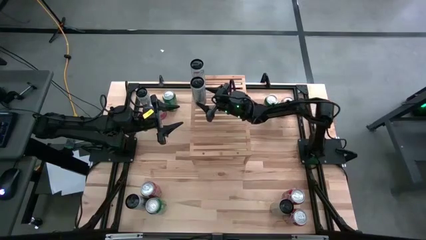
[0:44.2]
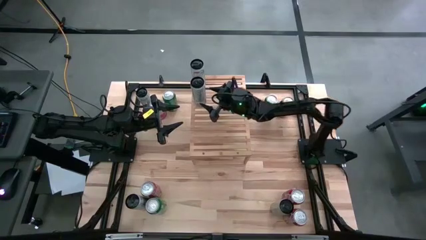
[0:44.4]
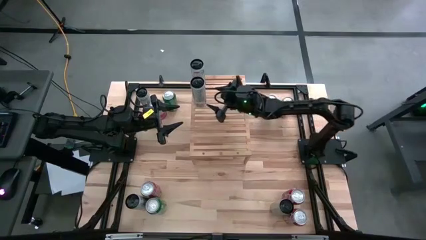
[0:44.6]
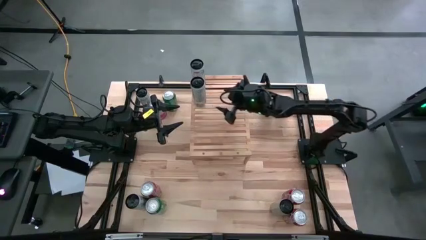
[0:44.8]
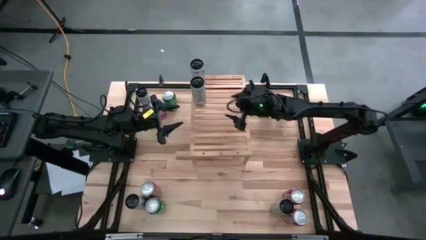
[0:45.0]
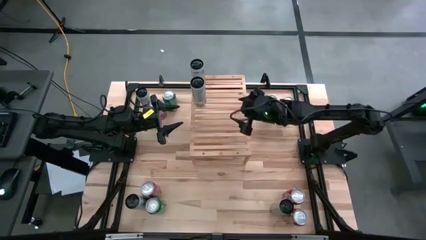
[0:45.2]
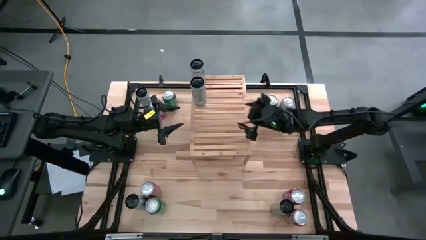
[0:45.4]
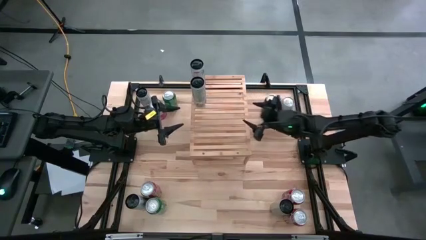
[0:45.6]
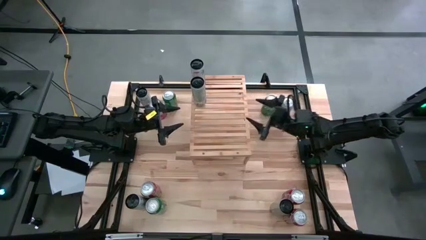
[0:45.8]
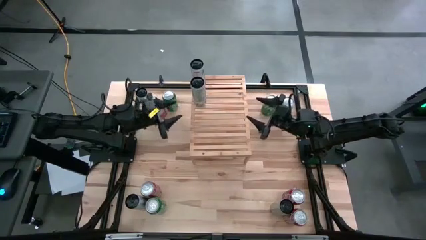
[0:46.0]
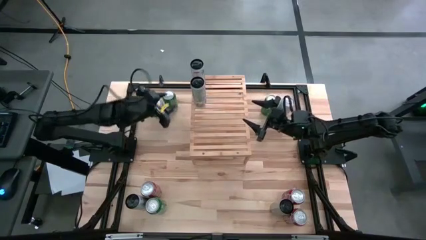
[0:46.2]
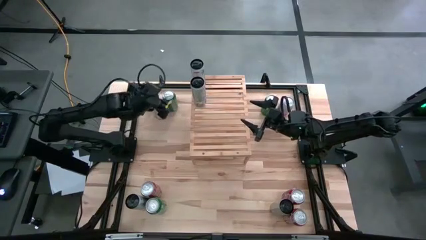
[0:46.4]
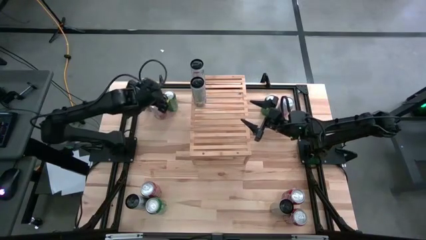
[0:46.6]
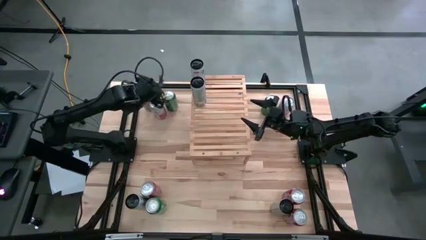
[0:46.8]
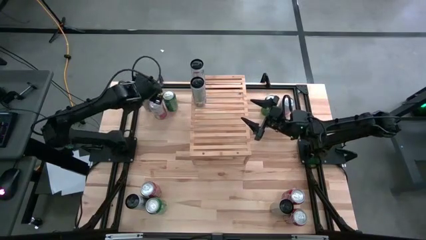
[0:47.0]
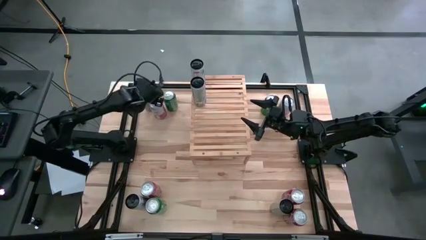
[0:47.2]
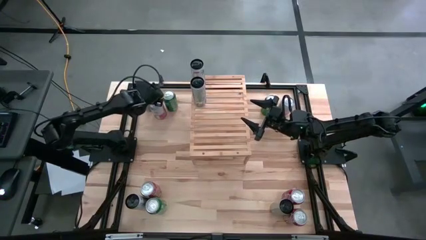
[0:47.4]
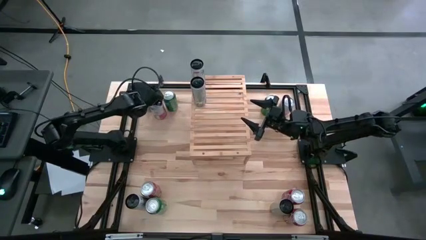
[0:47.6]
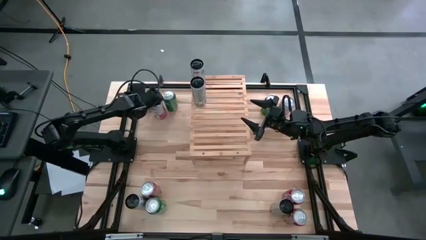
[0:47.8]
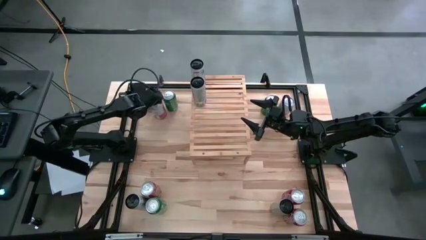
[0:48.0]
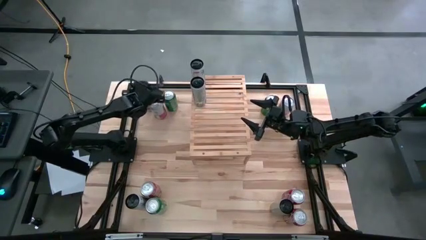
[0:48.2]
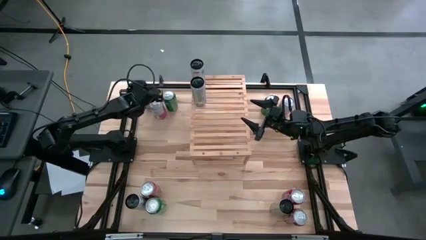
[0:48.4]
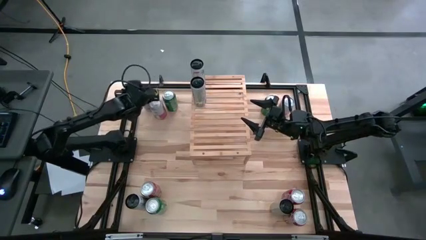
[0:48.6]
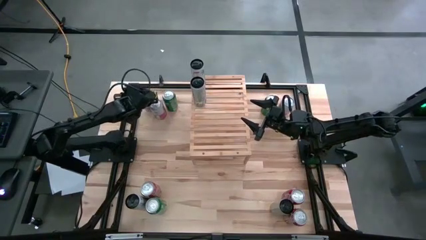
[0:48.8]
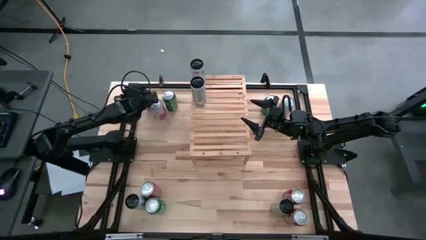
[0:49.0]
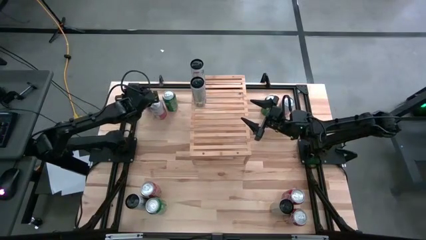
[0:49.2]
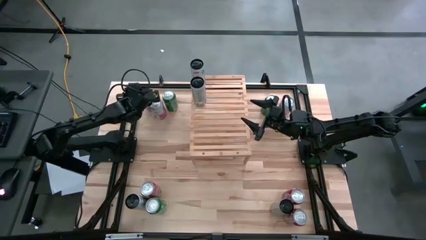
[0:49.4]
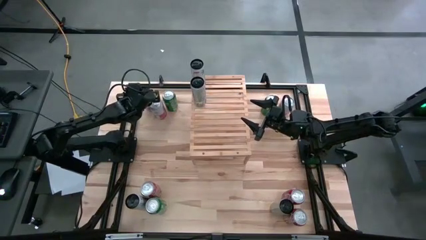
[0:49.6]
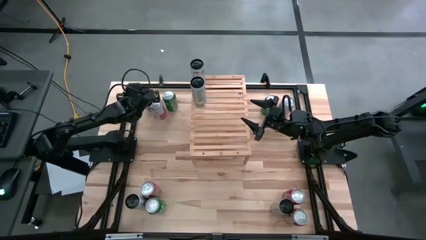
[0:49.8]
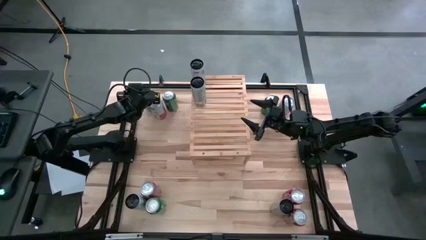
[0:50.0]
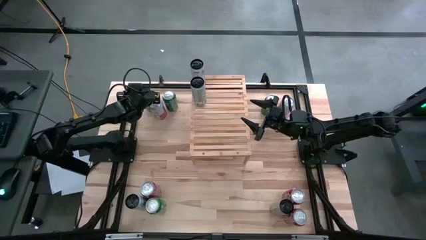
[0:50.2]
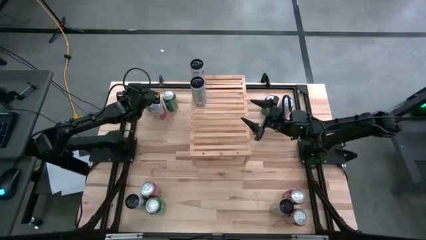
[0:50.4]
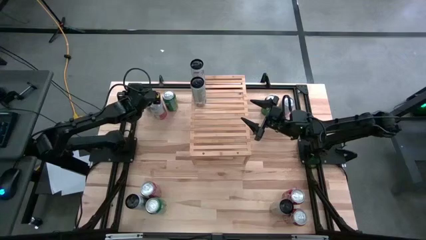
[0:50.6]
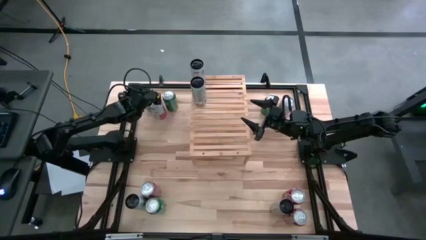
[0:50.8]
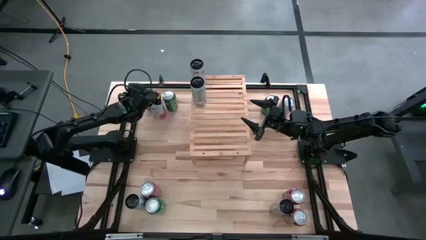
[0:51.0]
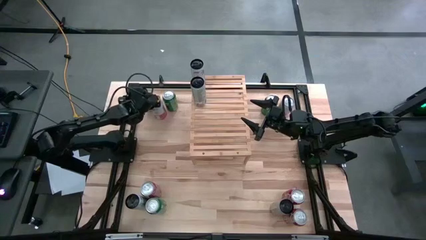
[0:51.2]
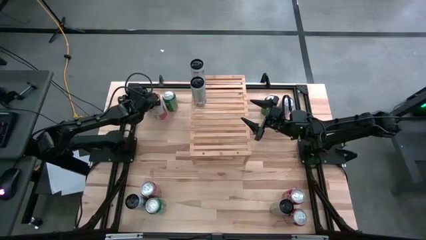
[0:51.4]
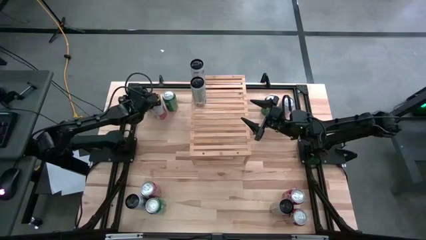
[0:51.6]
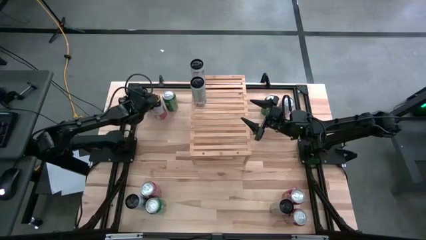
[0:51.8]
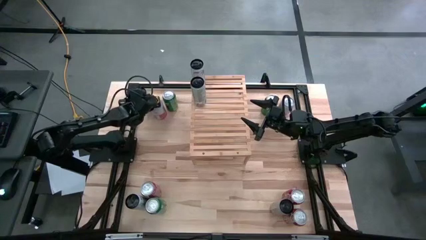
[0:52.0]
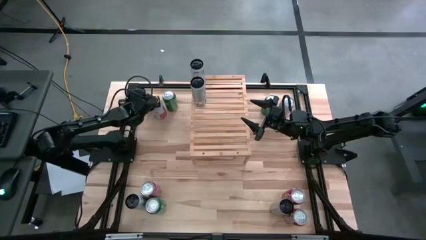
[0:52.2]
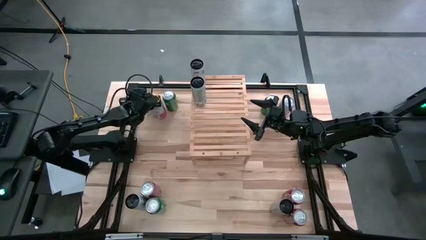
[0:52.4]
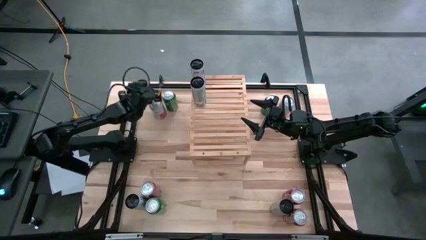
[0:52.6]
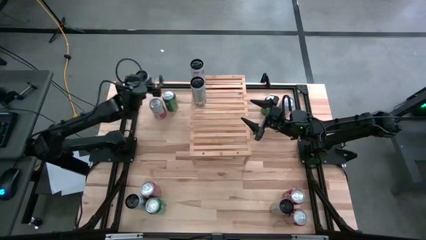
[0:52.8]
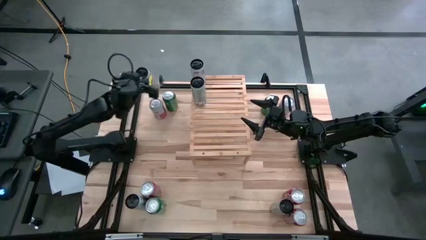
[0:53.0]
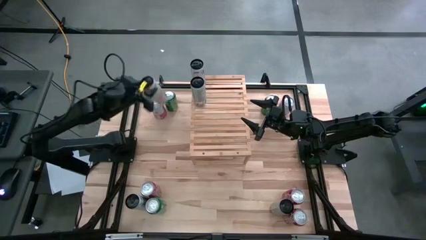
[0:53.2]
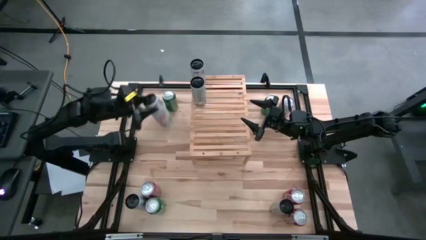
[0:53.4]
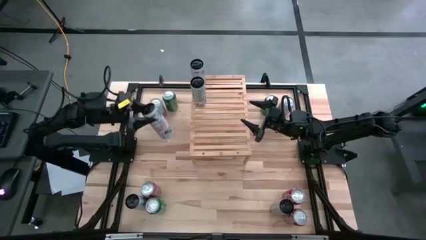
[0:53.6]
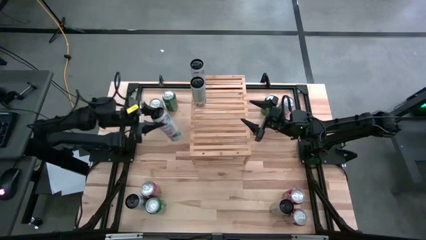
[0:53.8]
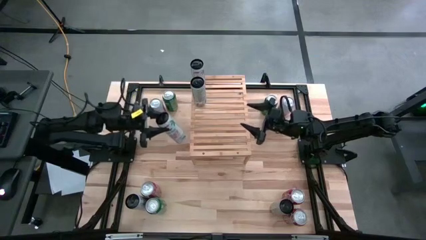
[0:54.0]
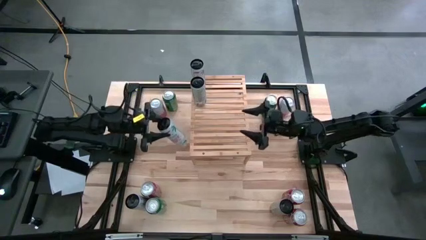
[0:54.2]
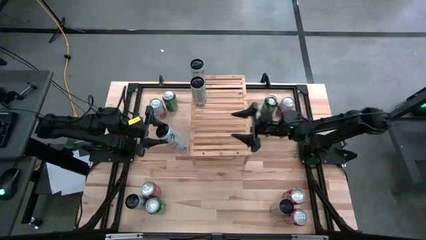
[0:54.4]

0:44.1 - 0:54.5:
Task: Place canned beverage on shelf
Put the top white pink soda can aligned with the other white pink soda can on the shelf

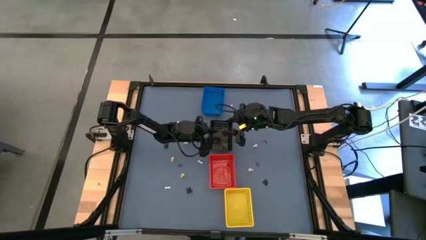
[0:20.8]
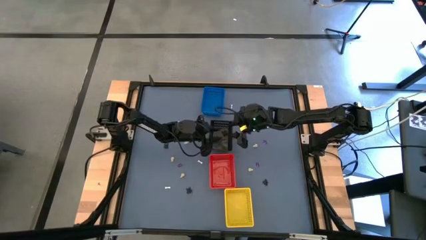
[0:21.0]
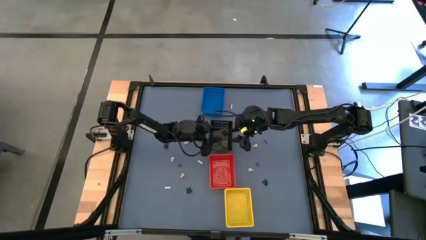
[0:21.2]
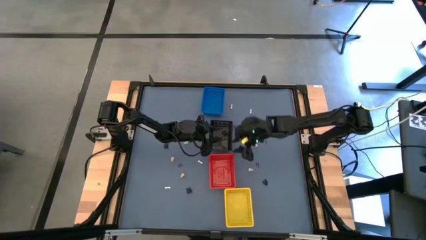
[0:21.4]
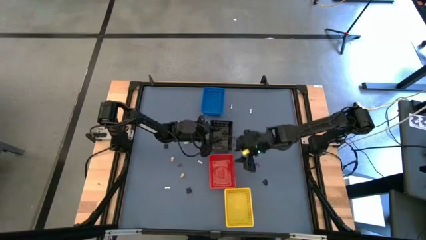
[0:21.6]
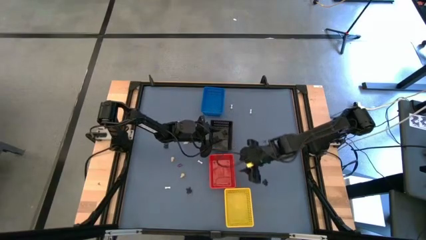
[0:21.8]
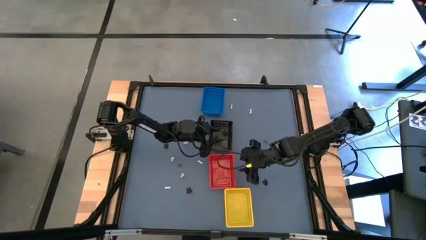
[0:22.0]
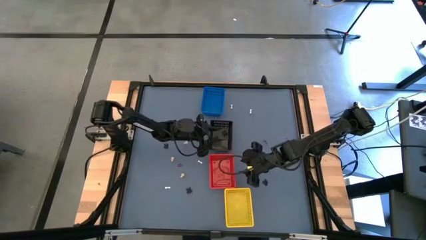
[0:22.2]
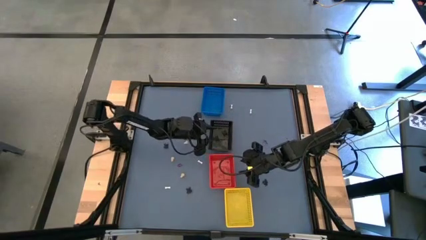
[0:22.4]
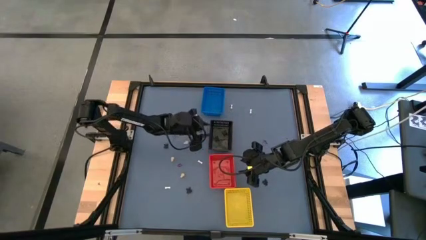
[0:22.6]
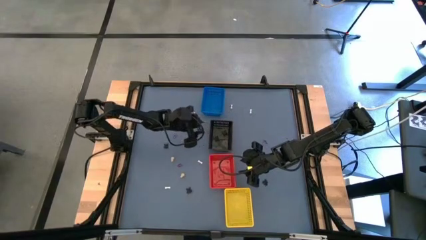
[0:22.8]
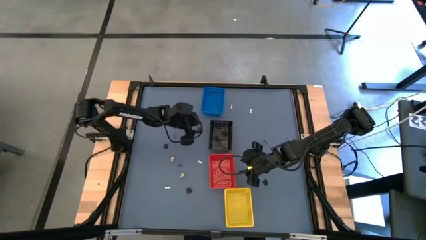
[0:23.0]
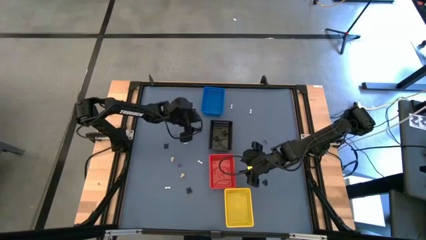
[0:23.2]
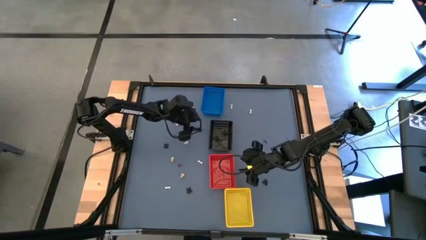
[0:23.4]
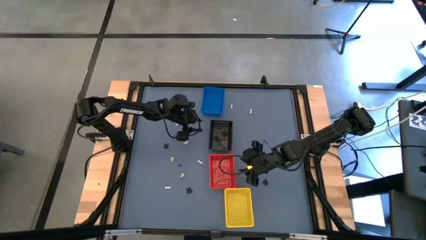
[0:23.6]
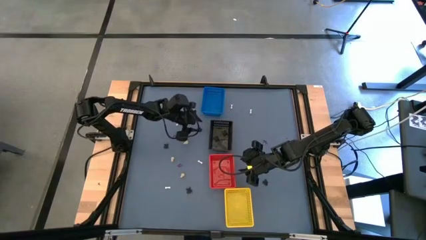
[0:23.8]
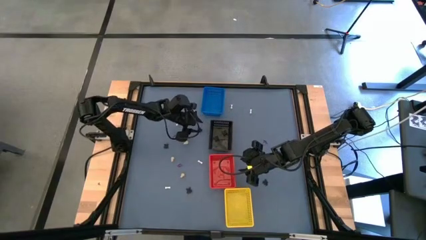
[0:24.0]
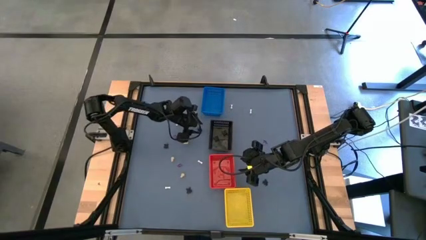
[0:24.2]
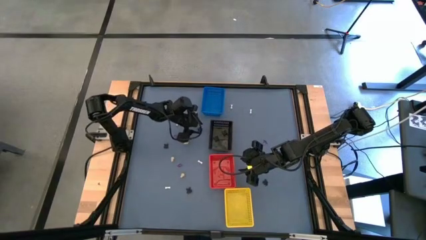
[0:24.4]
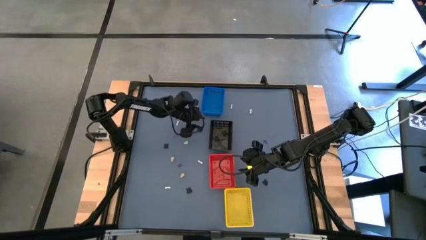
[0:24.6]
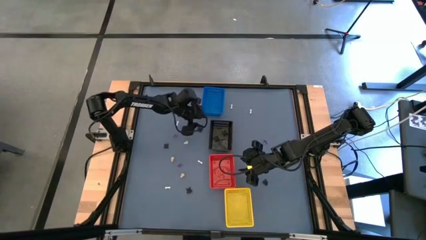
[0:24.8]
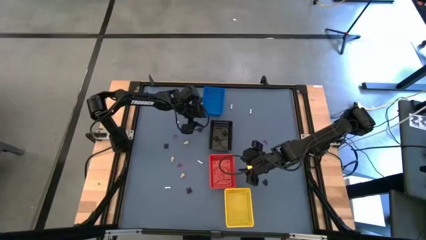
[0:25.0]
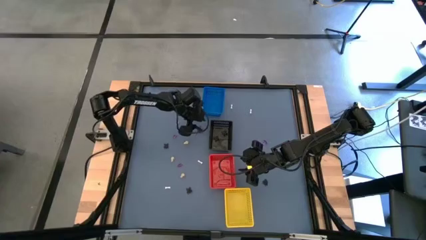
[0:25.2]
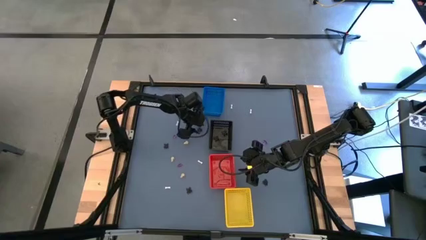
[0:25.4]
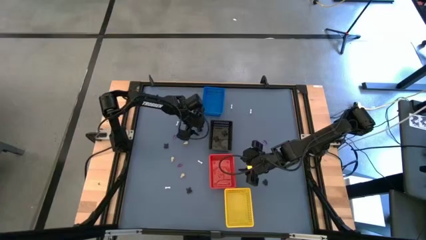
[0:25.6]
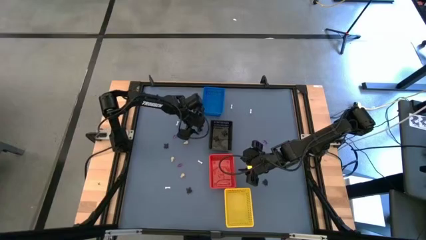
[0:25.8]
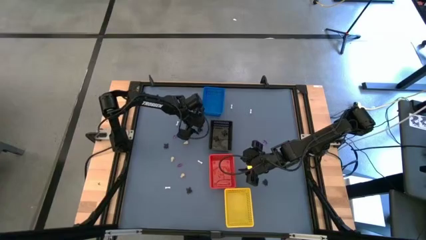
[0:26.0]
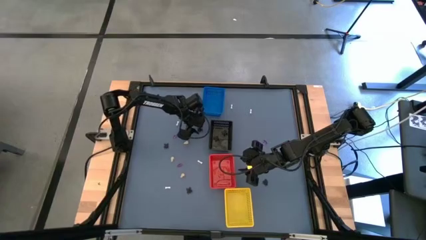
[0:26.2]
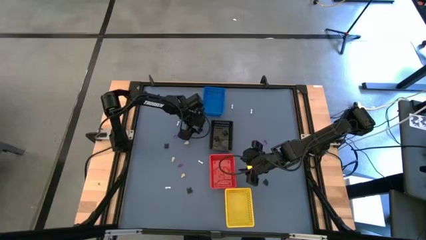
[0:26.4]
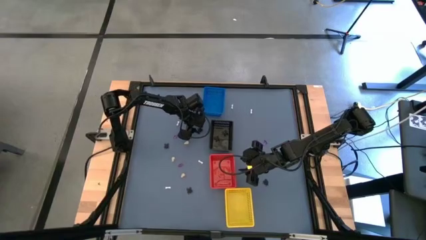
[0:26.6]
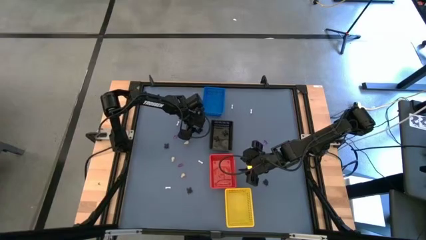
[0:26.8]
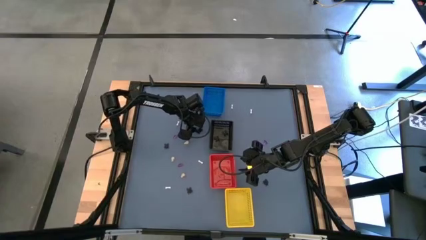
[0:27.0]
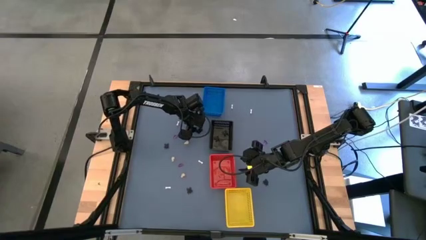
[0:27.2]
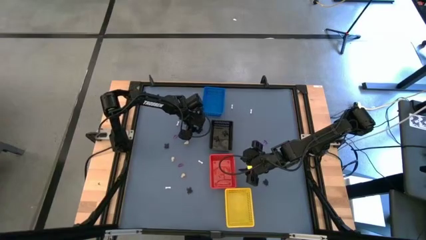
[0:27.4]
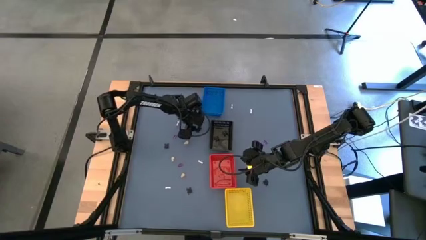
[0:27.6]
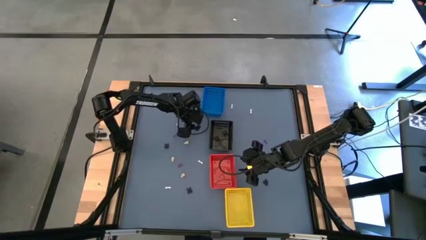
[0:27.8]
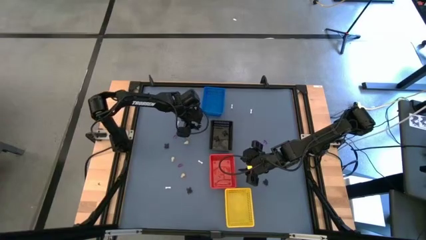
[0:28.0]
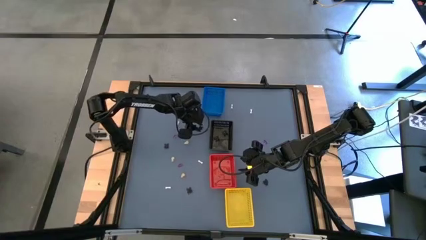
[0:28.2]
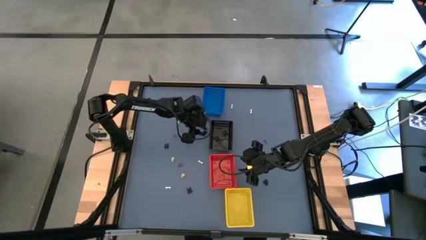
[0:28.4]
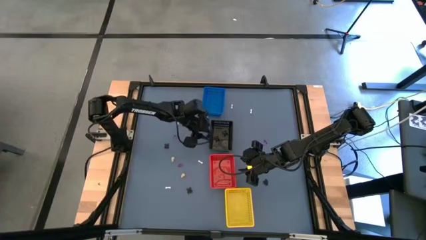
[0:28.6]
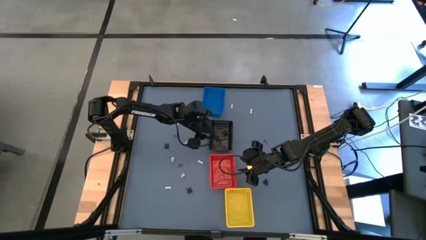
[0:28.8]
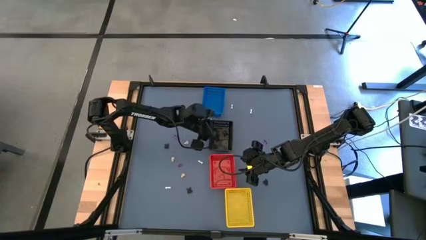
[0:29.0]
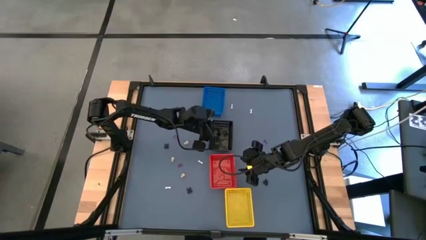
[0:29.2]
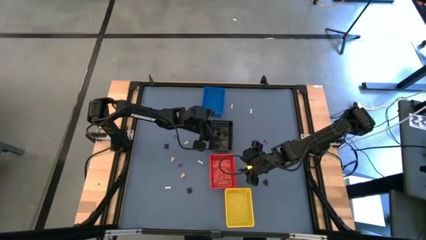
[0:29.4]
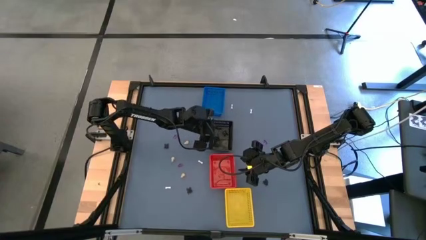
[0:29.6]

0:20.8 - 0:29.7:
Task: Sort Halloween decoration
Put the black spider toy into the black bin
